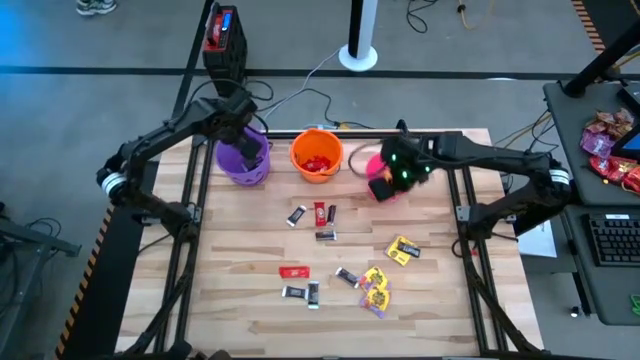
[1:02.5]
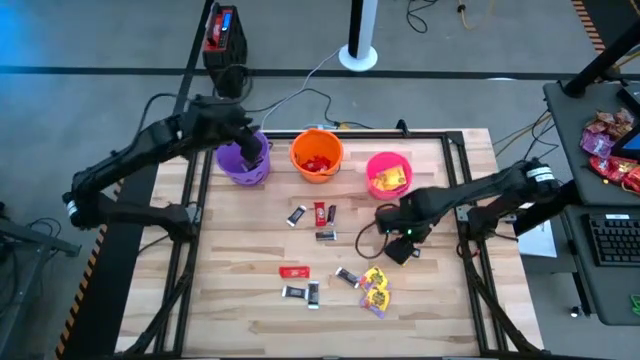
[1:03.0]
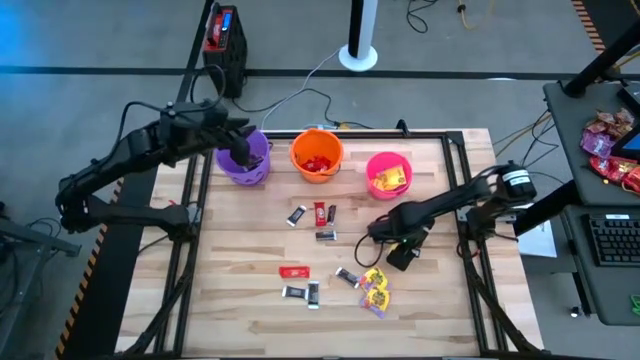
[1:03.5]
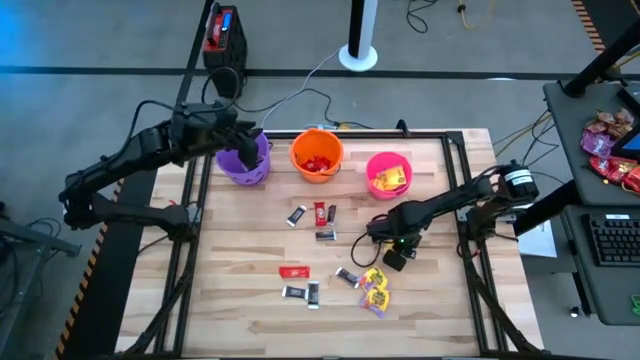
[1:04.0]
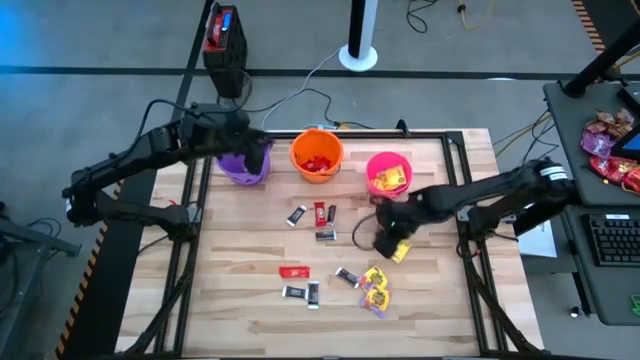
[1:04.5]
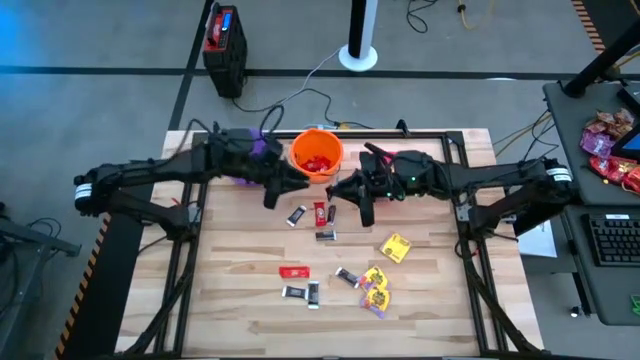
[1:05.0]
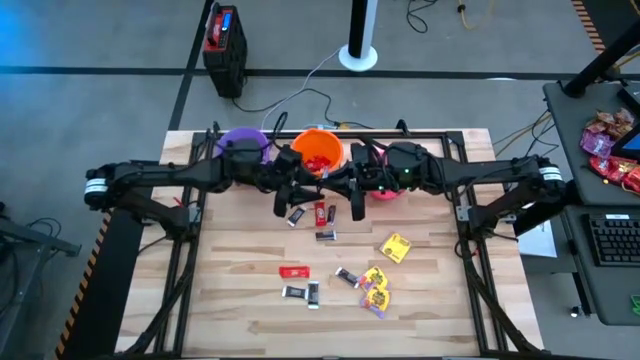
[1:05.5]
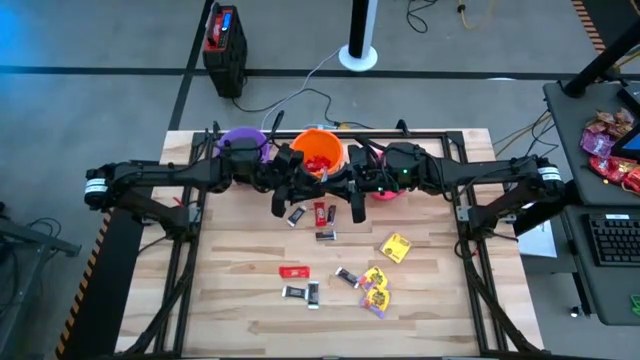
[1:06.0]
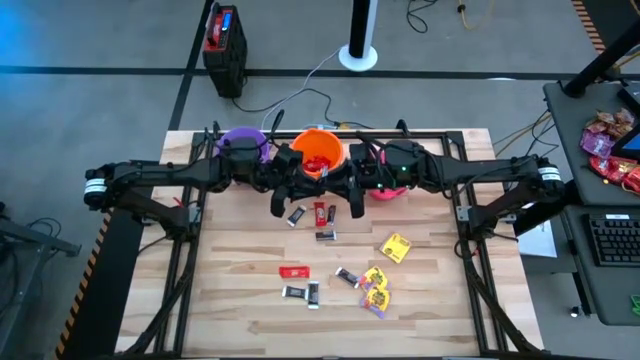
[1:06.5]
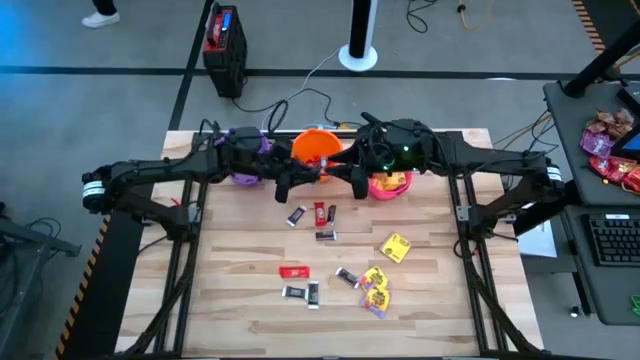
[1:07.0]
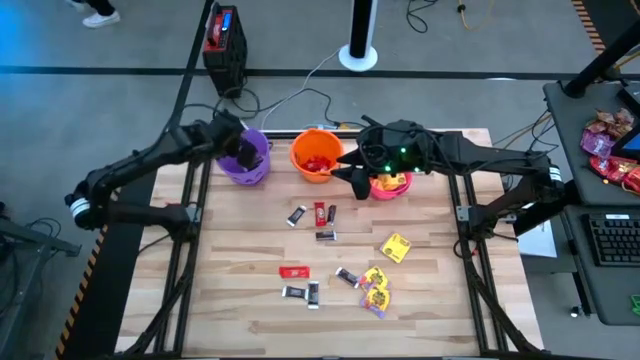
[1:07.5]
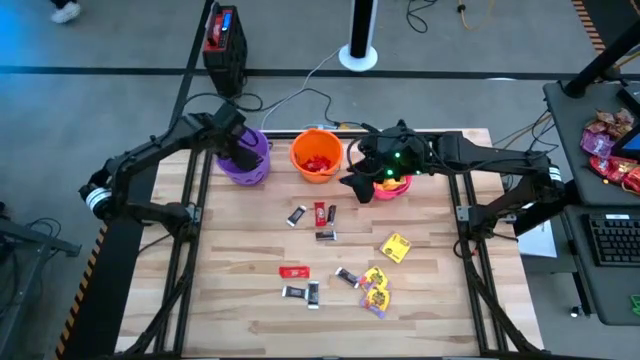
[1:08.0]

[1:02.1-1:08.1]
Task: Sort candy by brand, put in halloween buckets
Put the black candy into the violet bucket

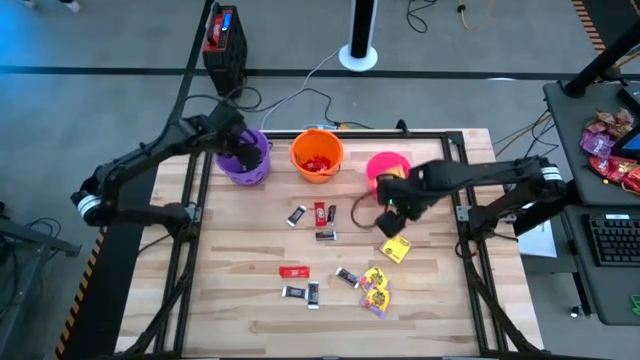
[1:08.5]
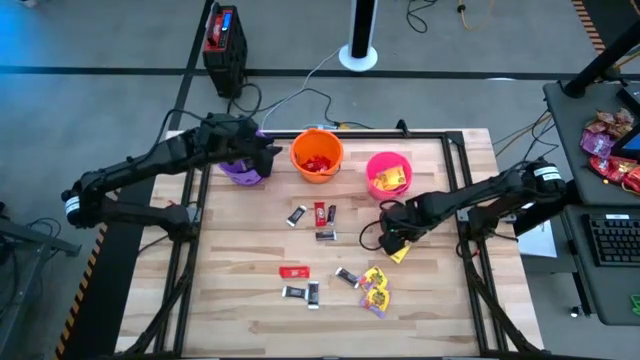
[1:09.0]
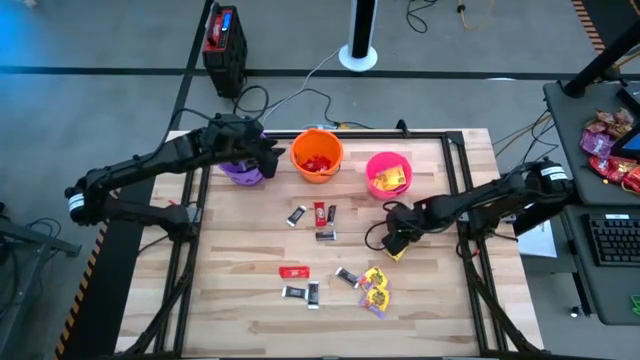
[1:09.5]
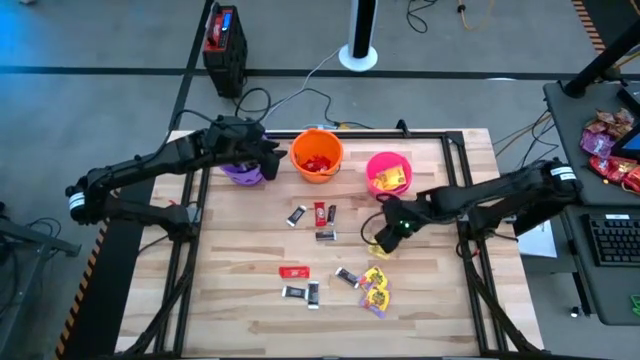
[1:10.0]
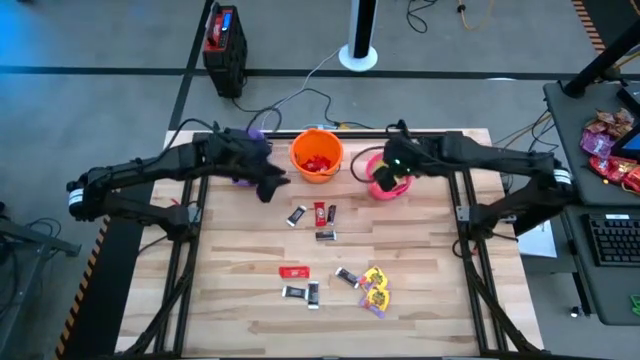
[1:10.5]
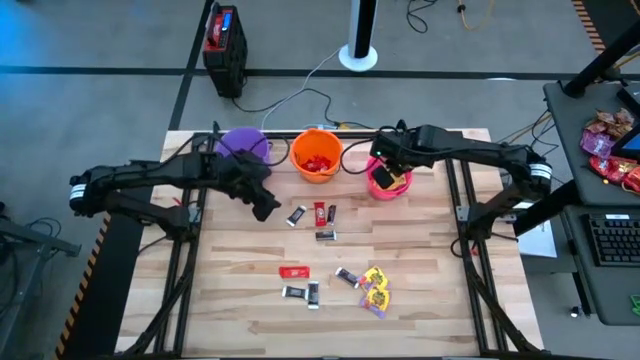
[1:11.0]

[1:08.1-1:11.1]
Put the yellow candy into the pink bucket

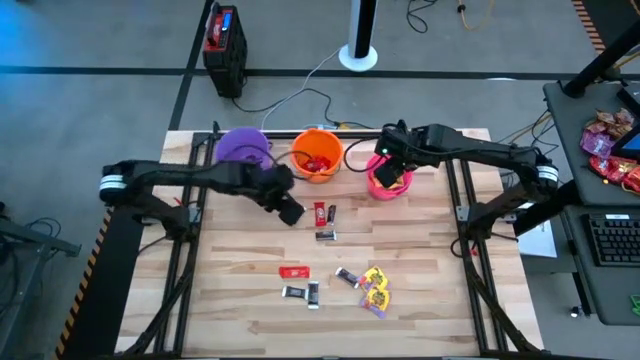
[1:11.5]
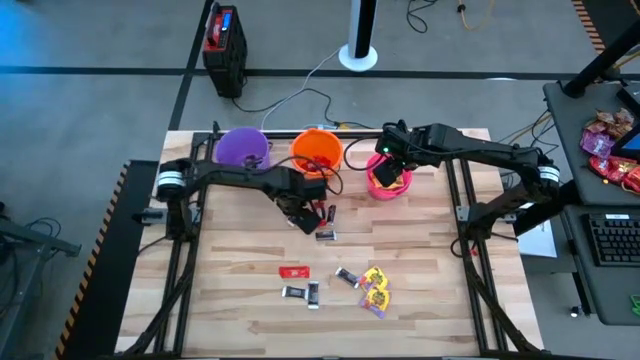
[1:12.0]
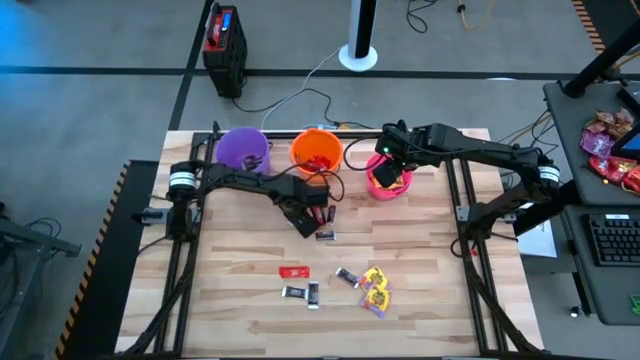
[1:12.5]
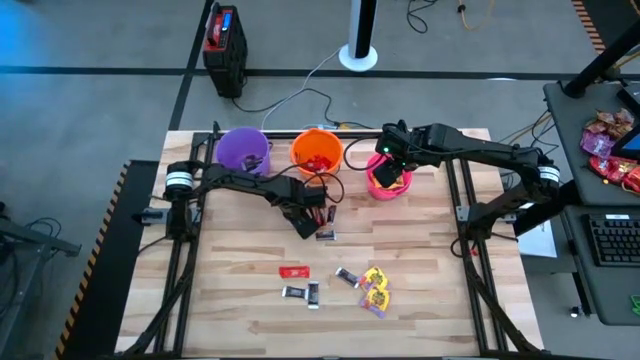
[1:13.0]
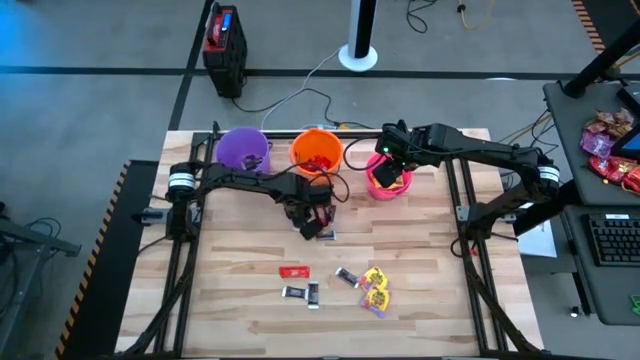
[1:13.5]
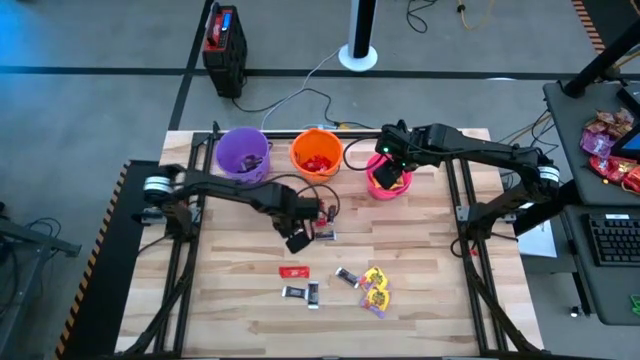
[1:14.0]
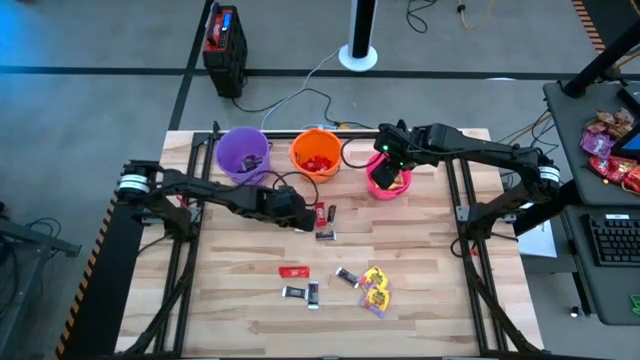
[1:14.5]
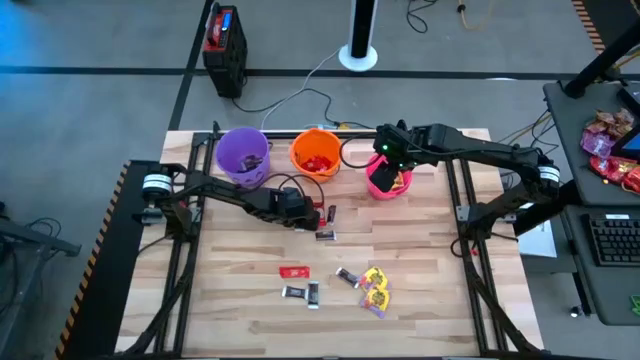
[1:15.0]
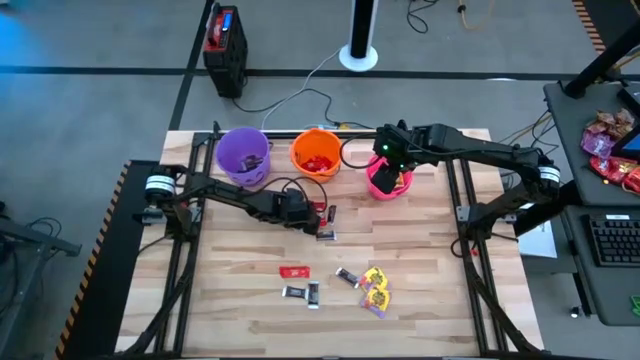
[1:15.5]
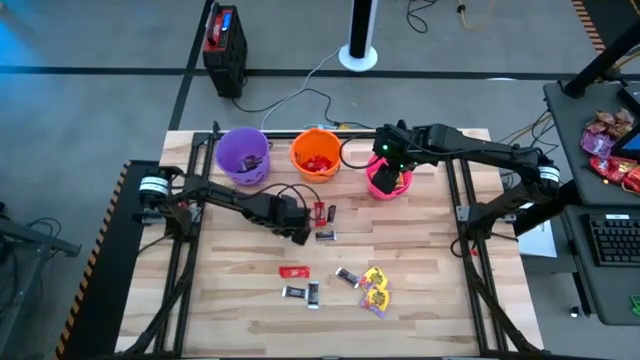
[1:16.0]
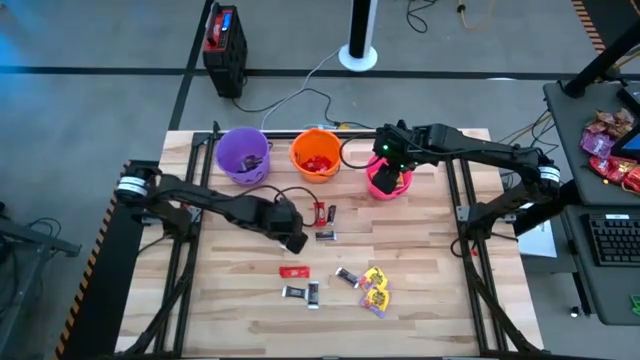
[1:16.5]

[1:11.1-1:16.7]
Put the black candy into the purple bucket

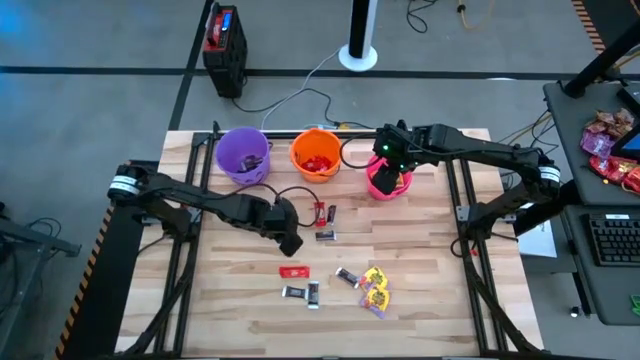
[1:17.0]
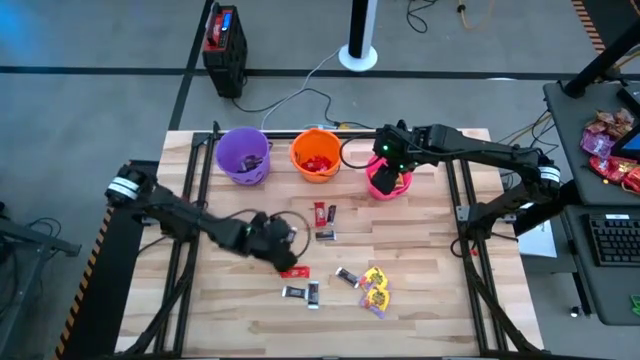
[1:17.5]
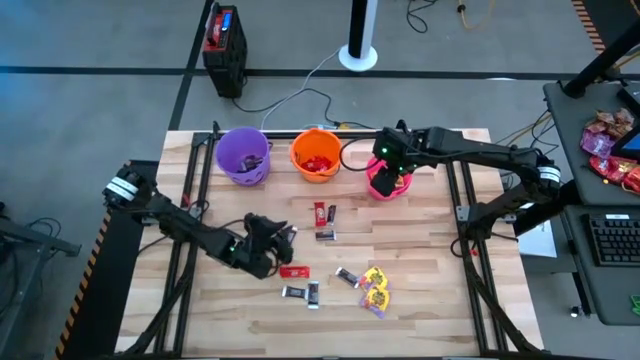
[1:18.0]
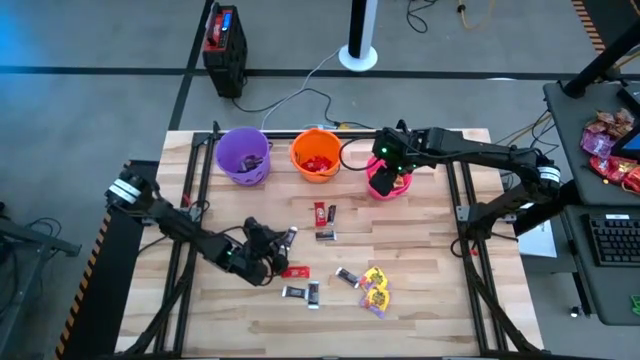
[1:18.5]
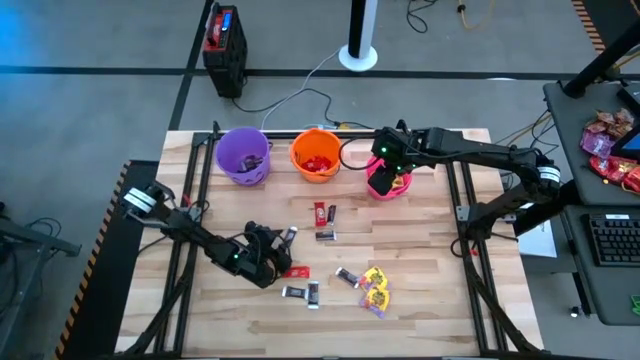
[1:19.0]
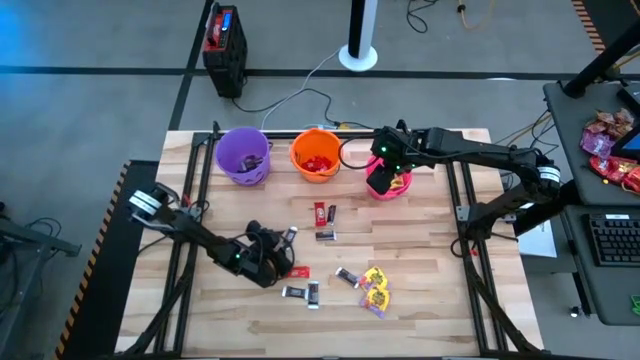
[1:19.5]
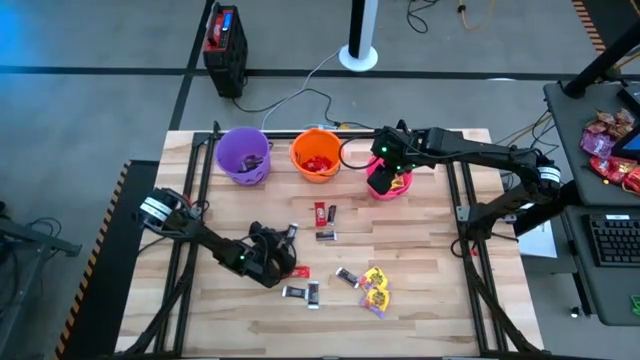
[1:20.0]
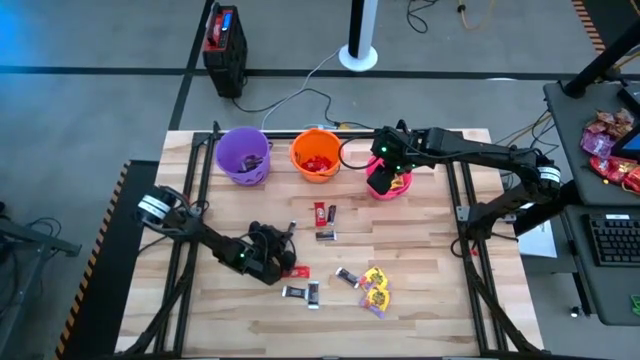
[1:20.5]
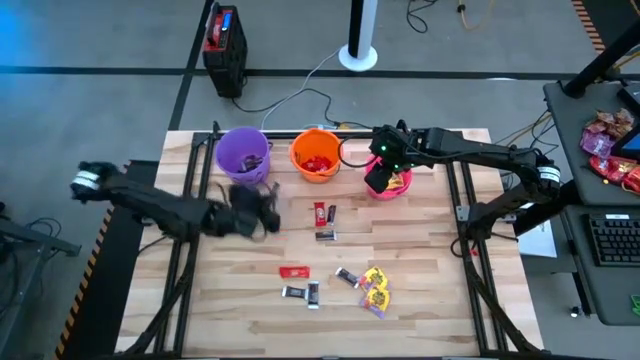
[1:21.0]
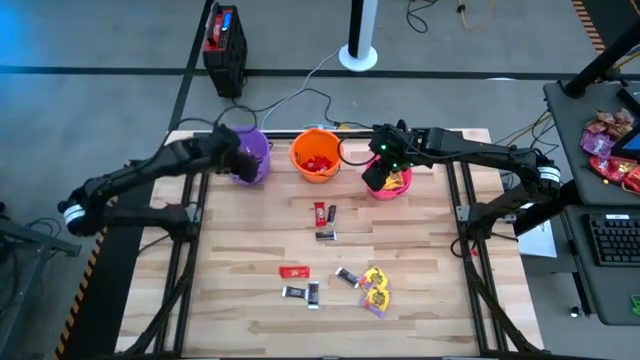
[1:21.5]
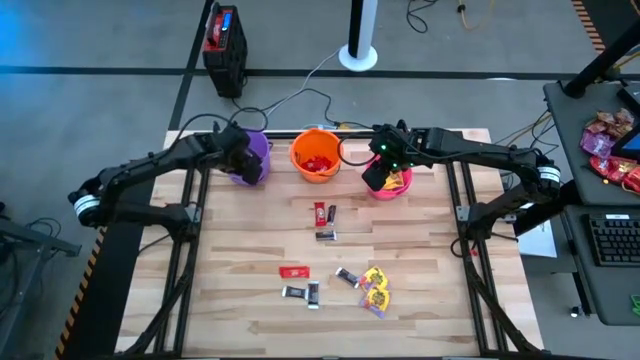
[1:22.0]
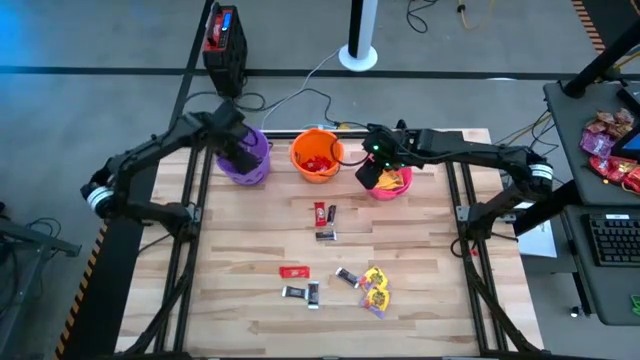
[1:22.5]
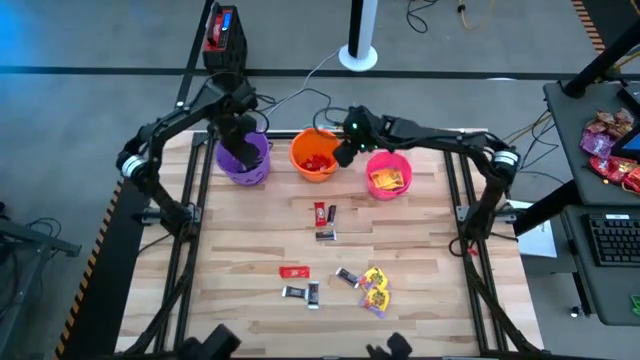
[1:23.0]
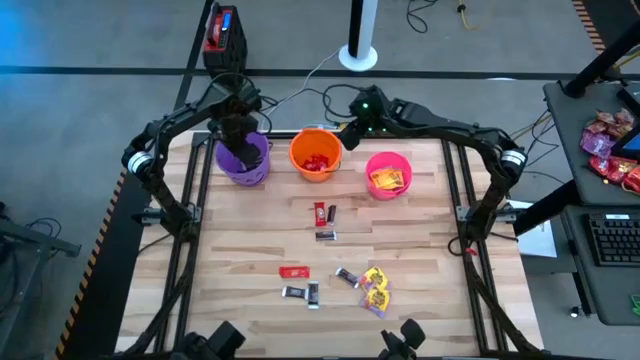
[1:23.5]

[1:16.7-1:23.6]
Put the black candy into the violet bucket
